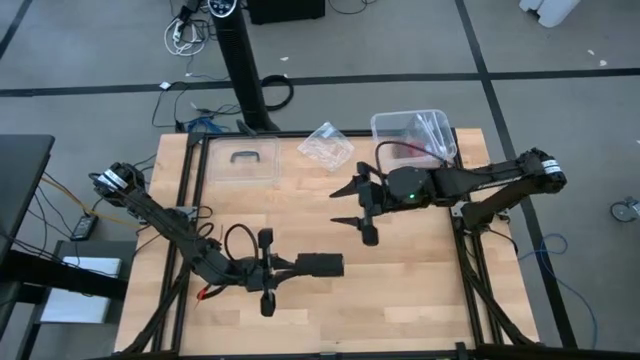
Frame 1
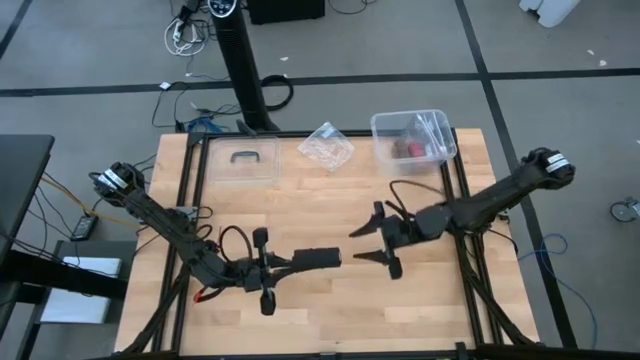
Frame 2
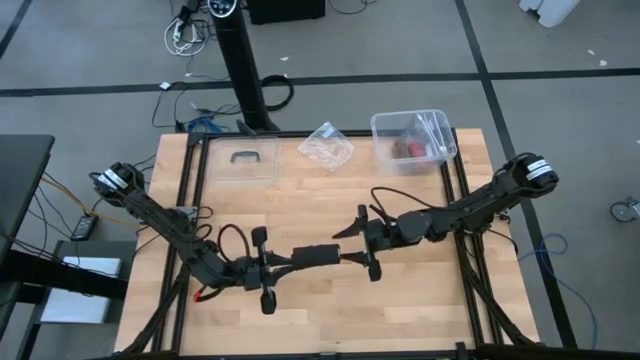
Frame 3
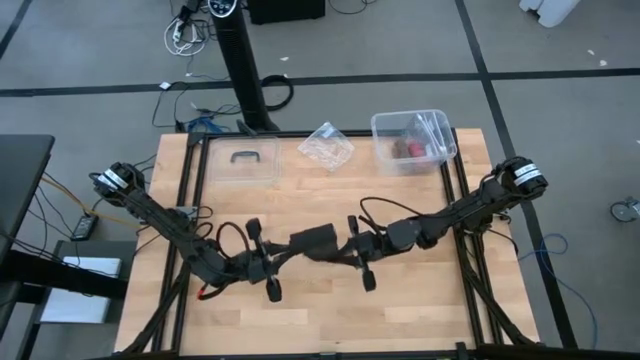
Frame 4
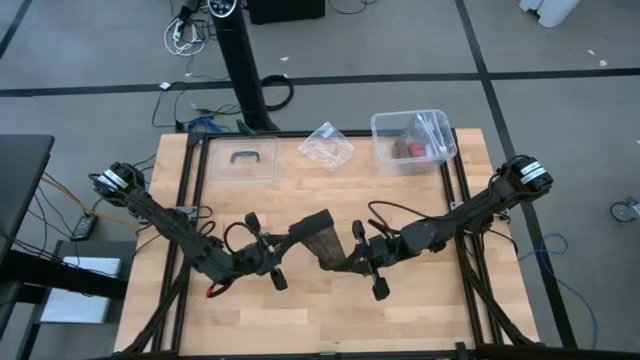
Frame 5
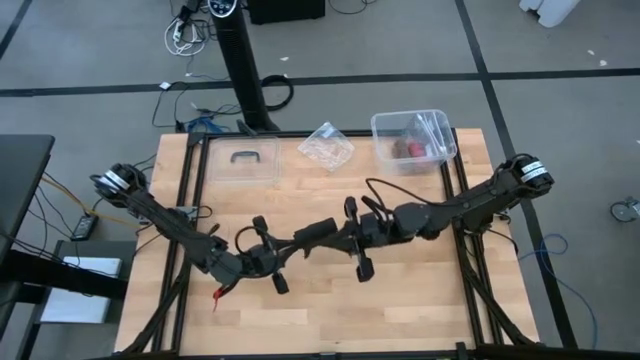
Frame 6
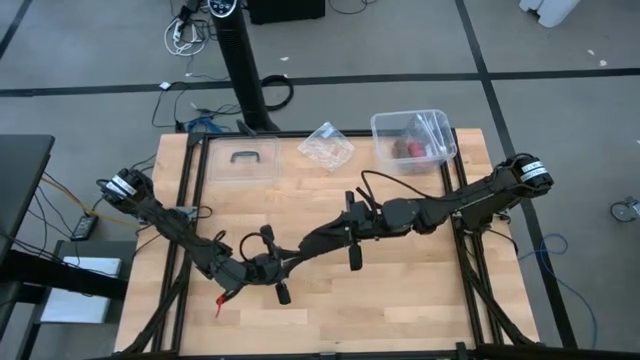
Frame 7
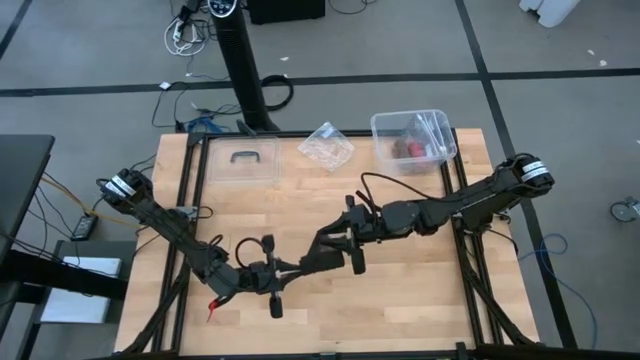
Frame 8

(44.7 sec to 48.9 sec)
Task: Roll bandage
Roll the black bandage

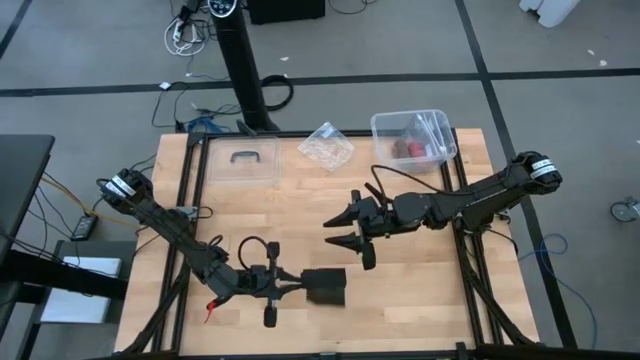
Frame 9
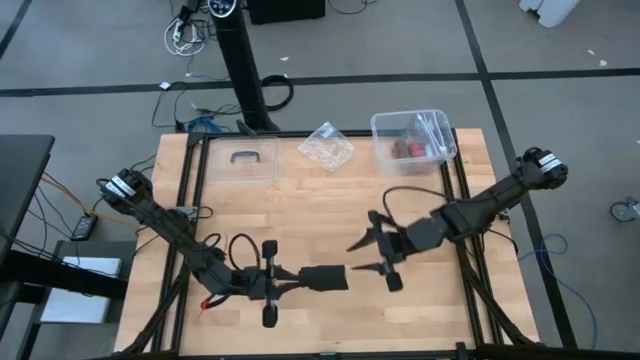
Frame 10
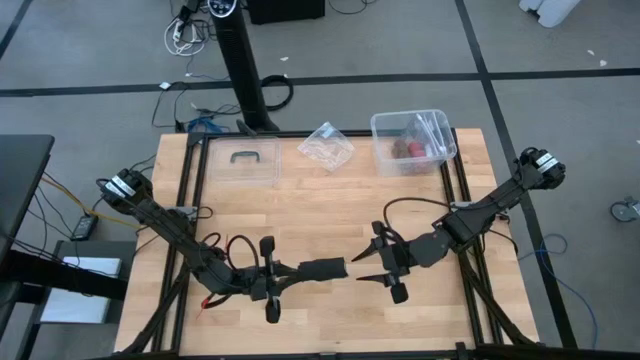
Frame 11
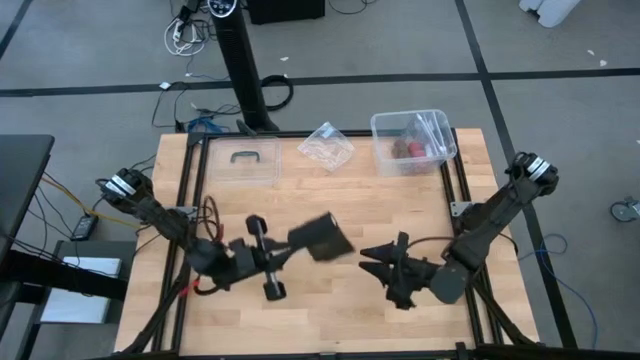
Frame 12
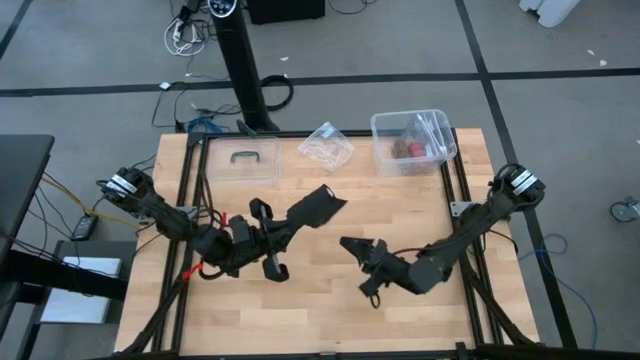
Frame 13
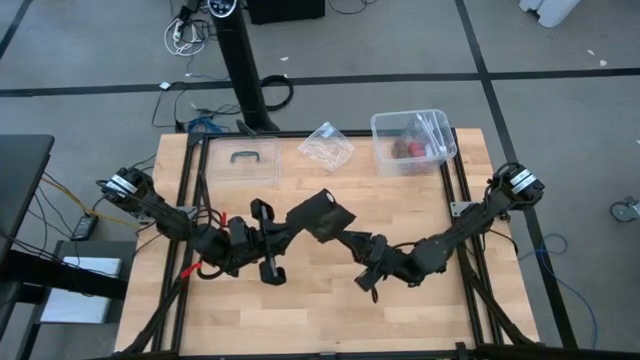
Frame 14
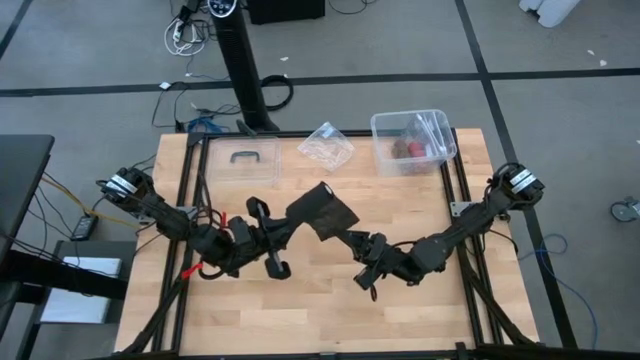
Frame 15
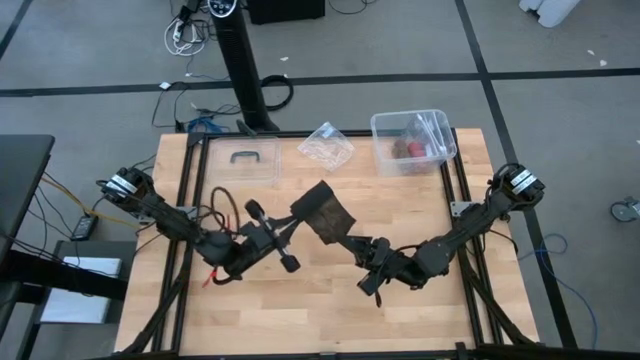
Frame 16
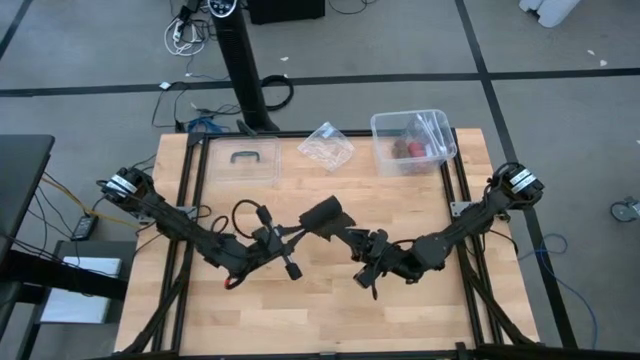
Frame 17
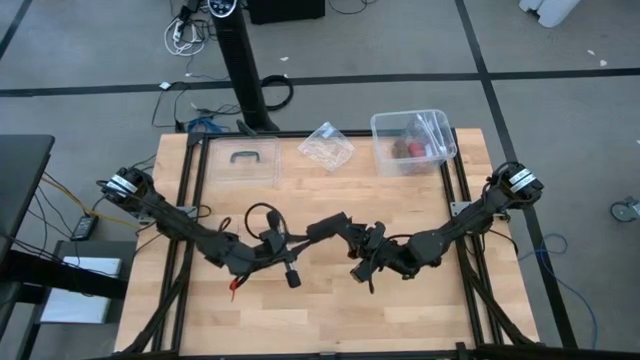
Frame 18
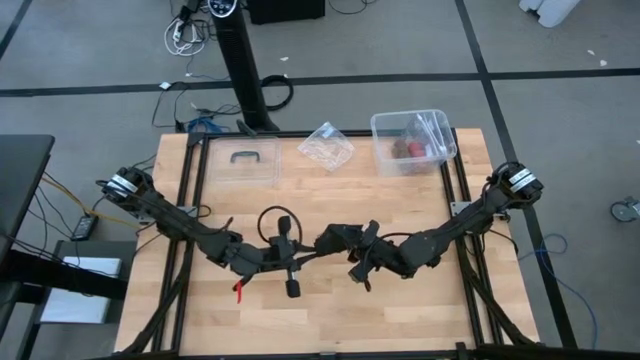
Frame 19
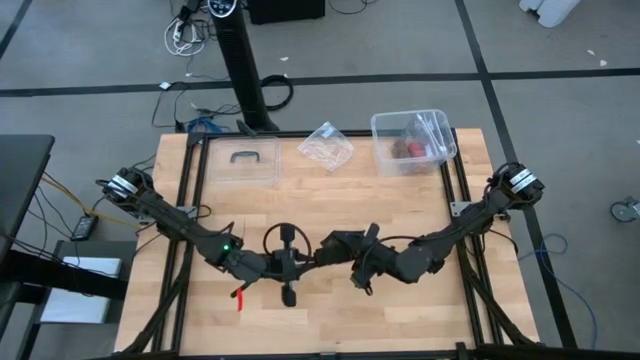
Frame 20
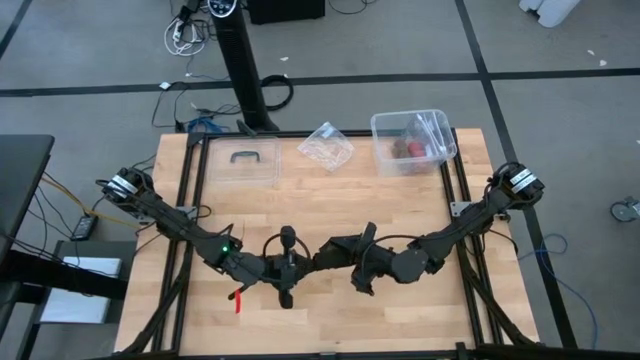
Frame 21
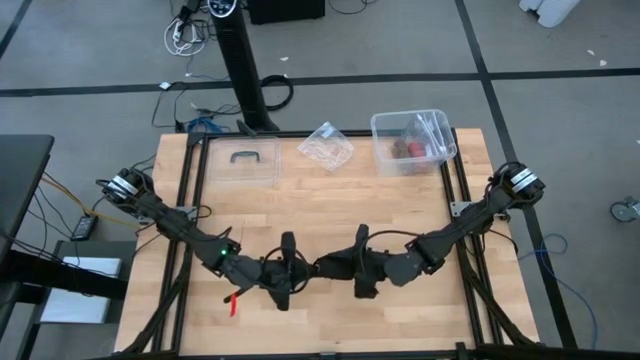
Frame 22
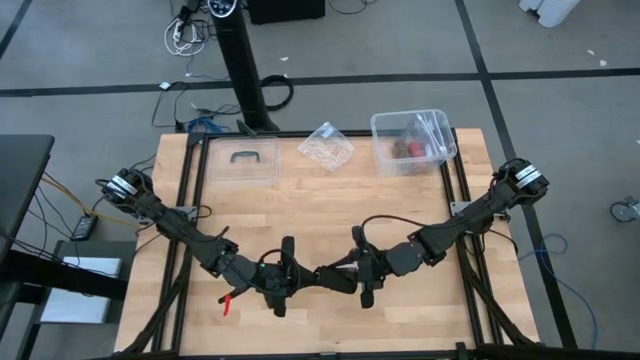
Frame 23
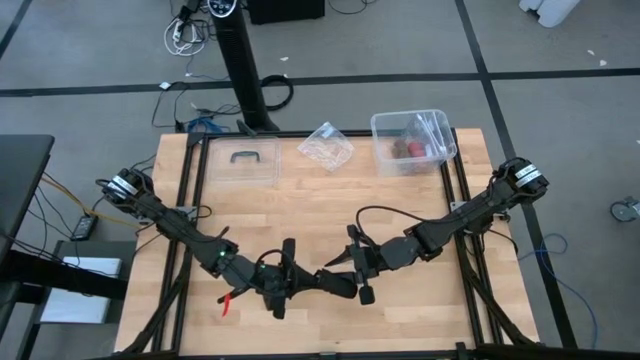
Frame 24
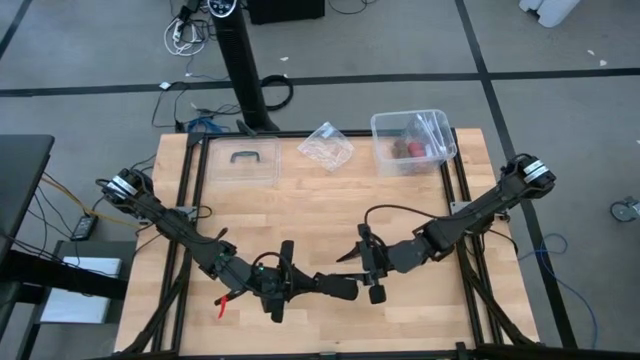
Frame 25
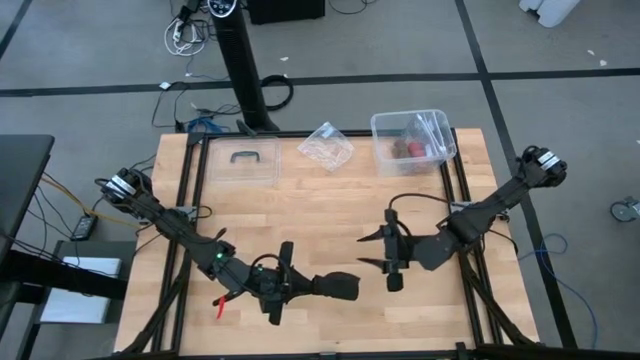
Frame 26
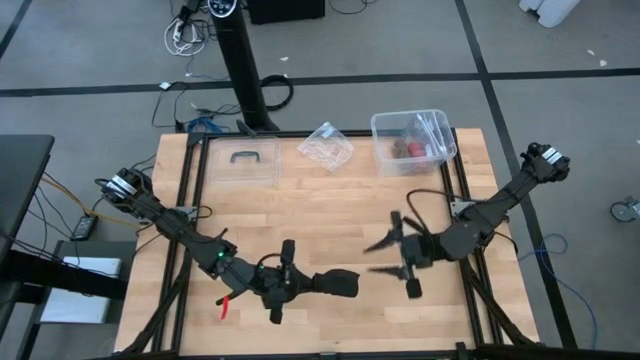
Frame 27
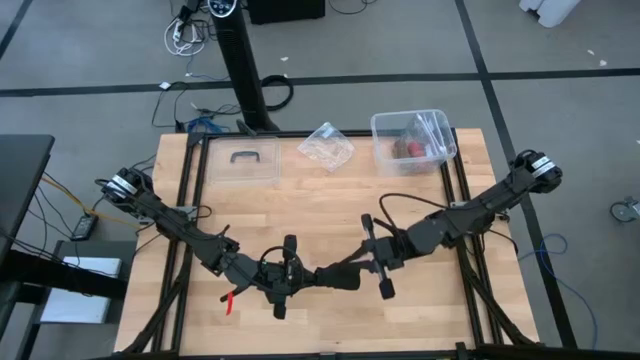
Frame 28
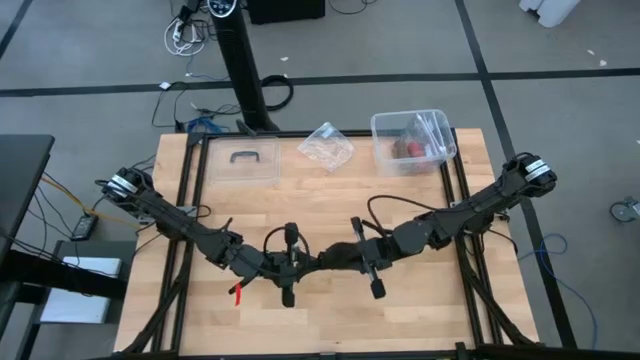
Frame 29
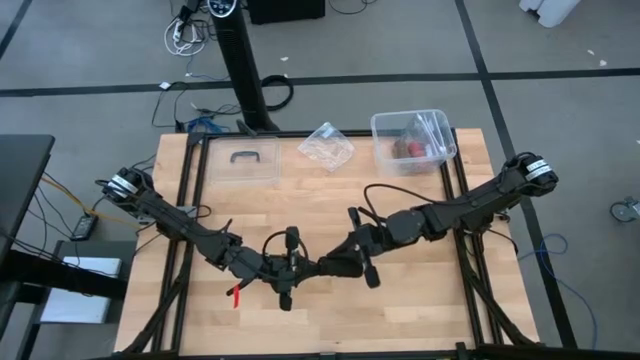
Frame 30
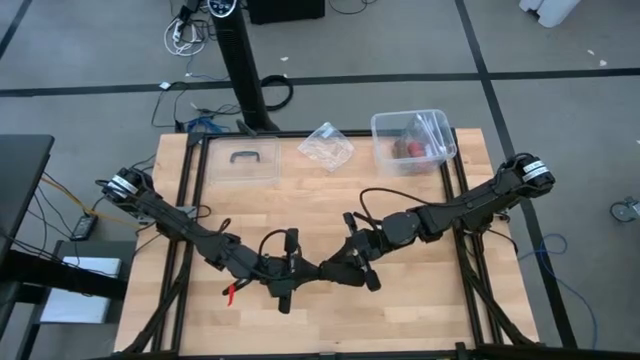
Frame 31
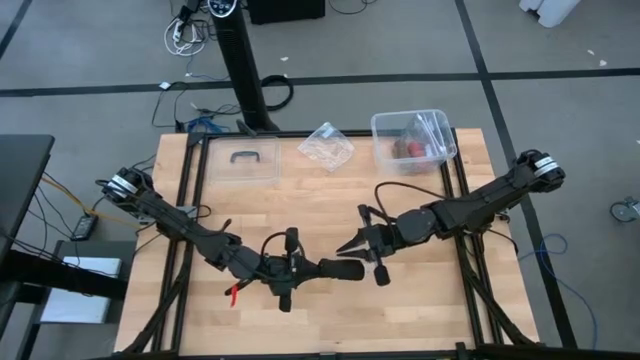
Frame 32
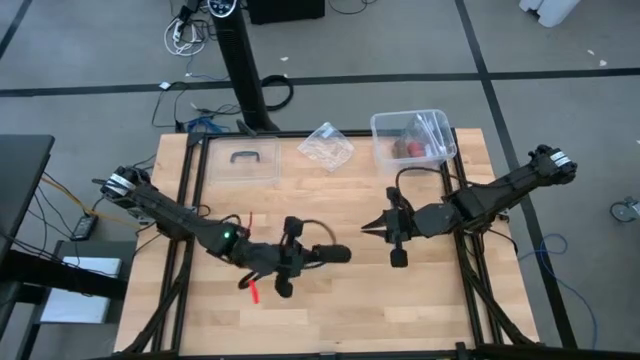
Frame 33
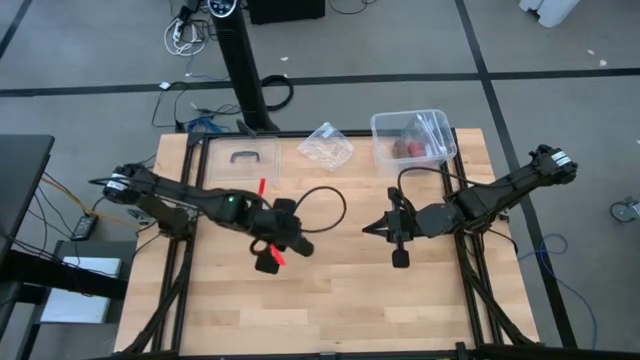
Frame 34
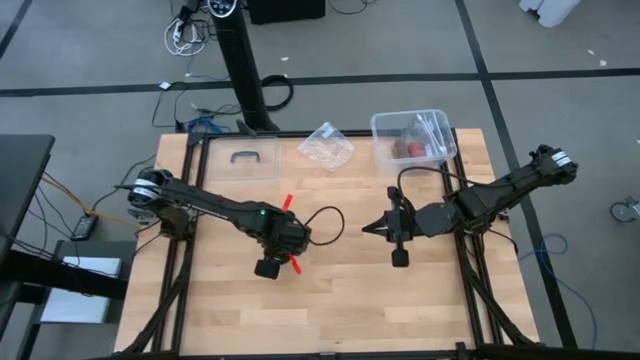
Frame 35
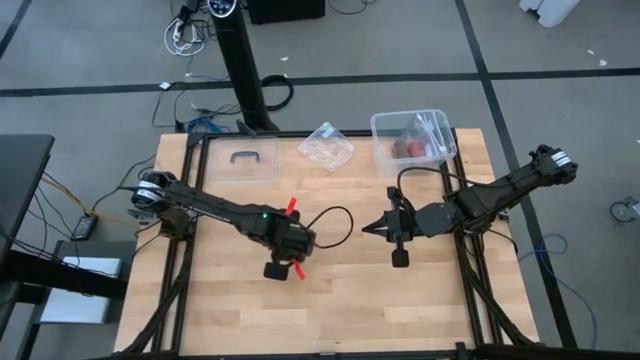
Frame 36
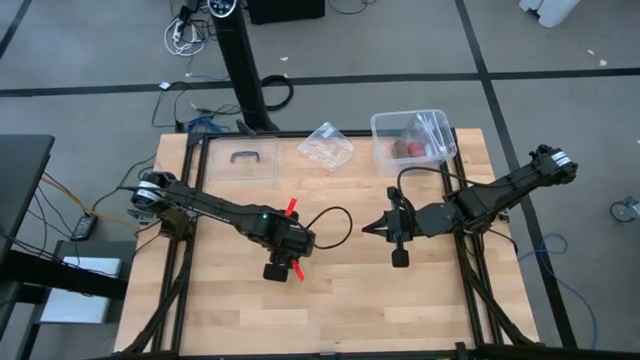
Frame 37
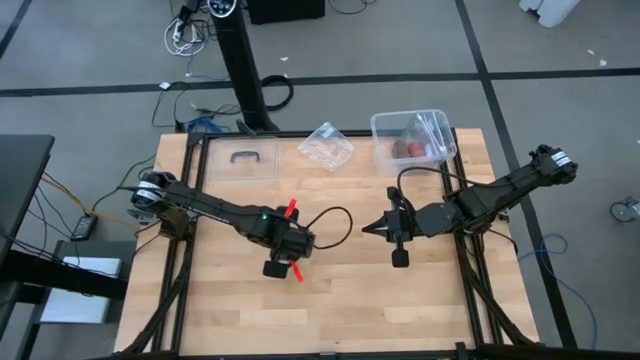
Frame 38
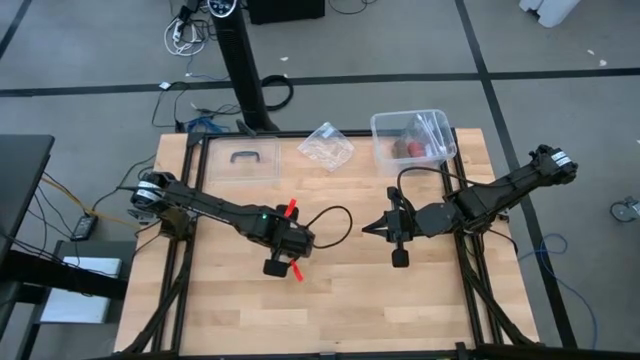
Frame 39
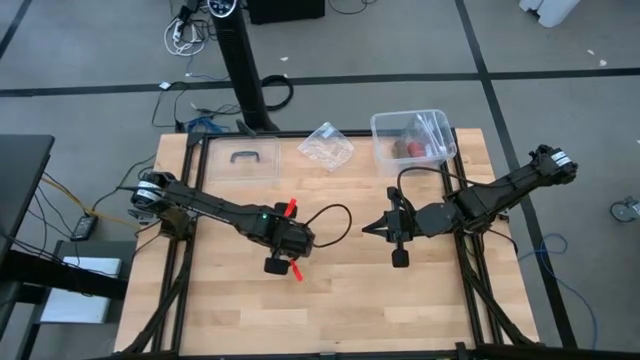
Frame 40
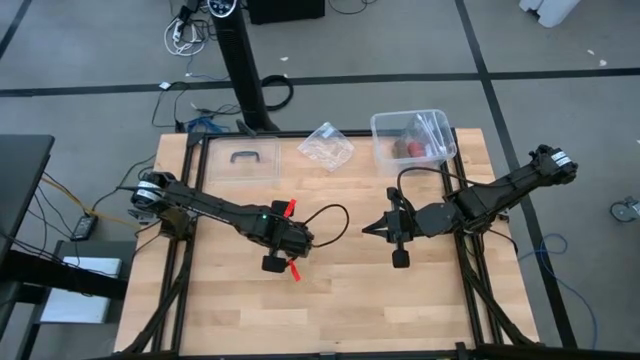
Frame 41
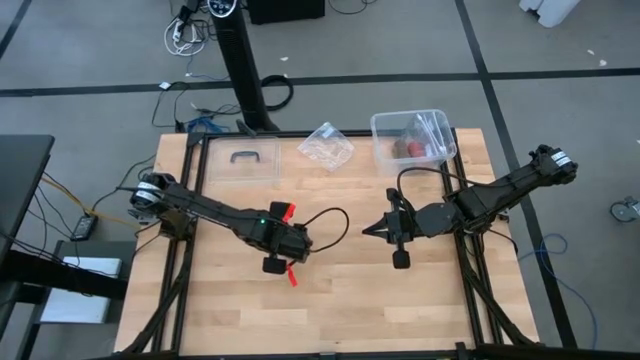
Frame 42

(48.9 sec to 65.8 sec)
Roll the black bandage
